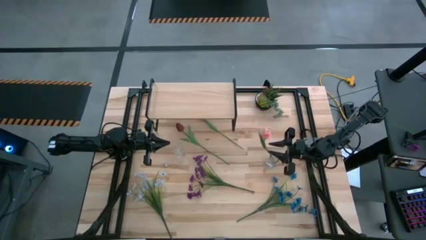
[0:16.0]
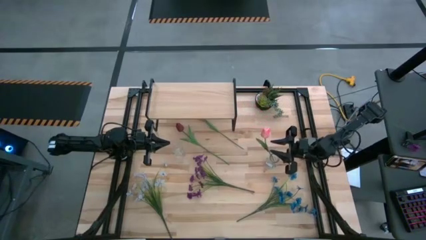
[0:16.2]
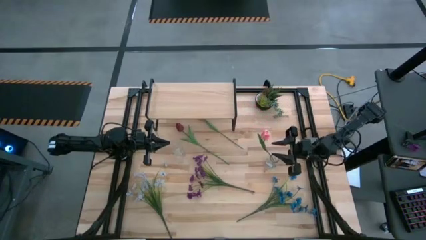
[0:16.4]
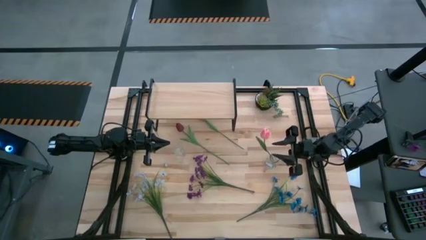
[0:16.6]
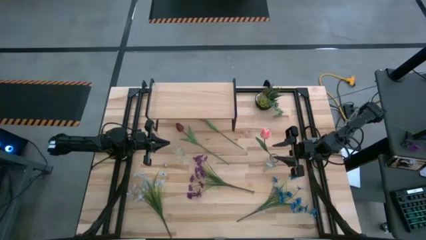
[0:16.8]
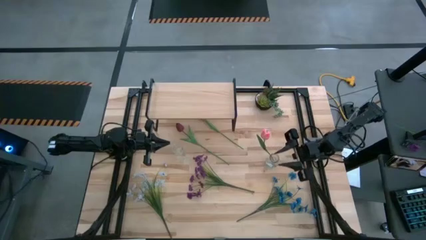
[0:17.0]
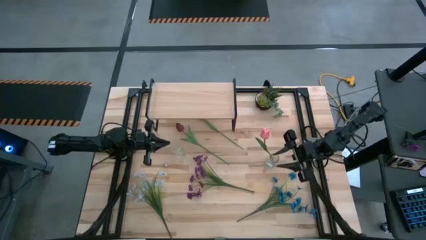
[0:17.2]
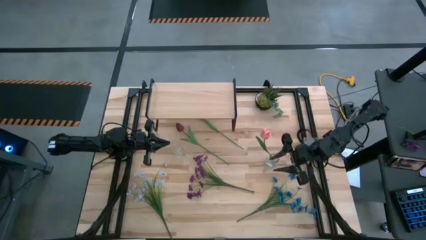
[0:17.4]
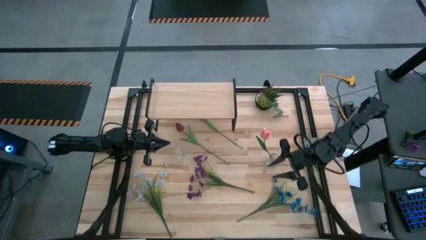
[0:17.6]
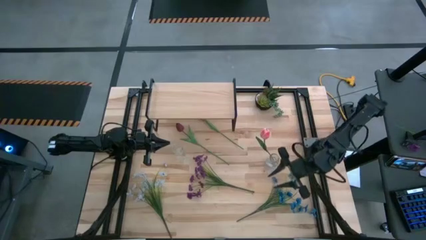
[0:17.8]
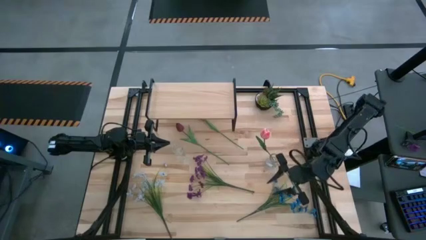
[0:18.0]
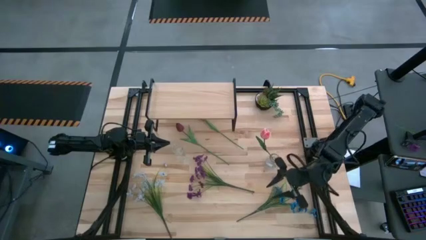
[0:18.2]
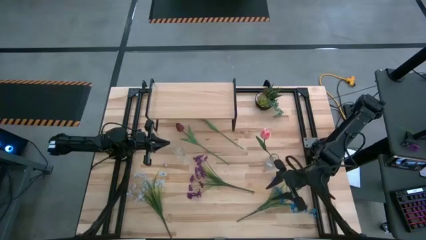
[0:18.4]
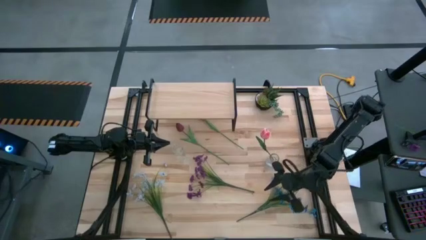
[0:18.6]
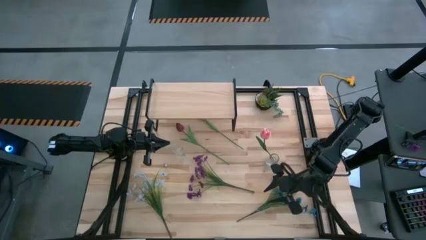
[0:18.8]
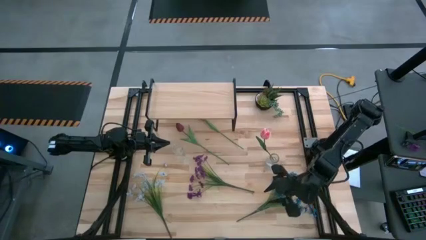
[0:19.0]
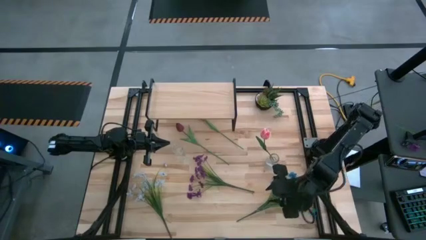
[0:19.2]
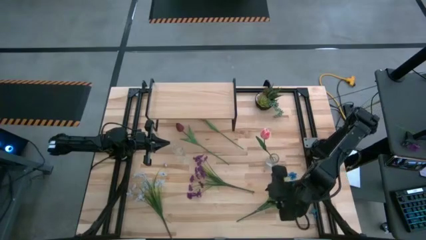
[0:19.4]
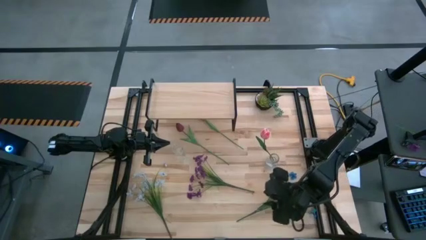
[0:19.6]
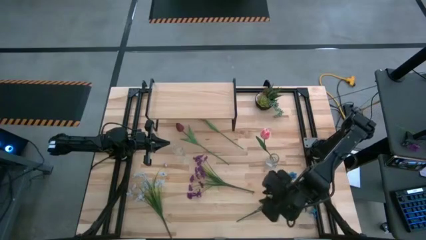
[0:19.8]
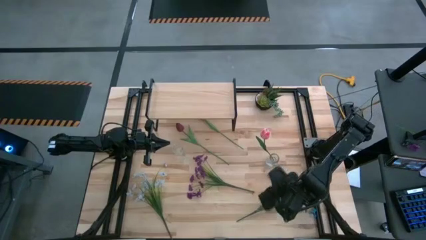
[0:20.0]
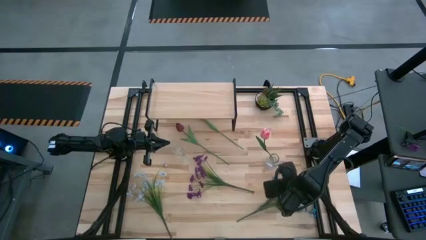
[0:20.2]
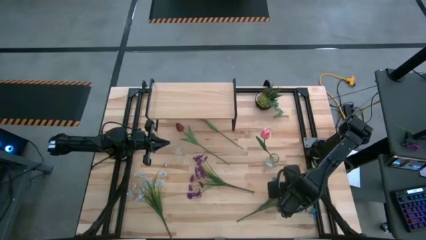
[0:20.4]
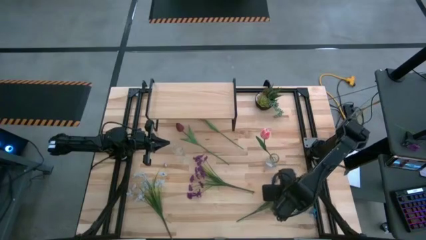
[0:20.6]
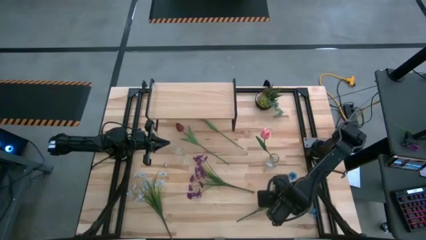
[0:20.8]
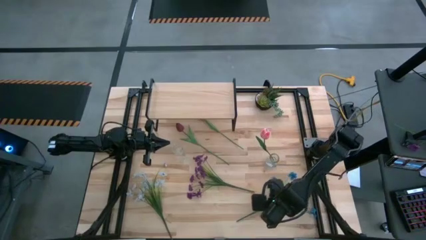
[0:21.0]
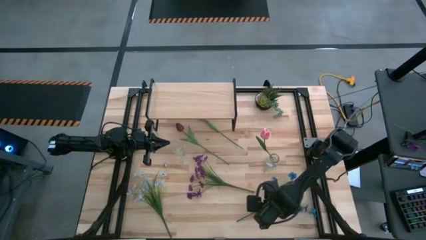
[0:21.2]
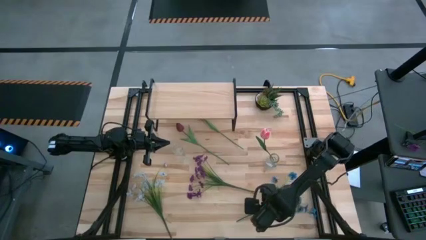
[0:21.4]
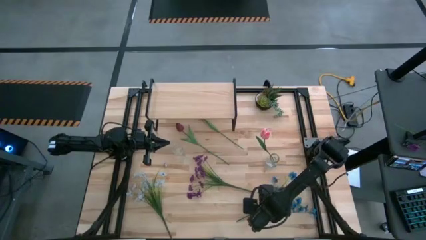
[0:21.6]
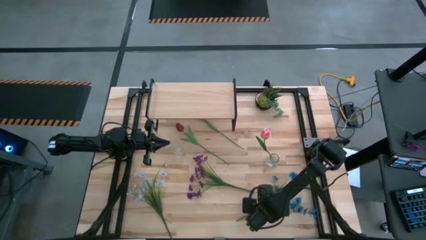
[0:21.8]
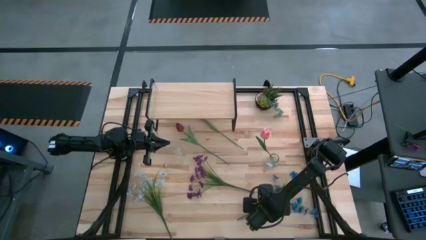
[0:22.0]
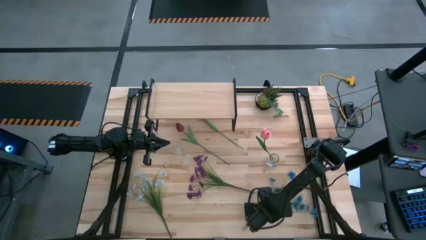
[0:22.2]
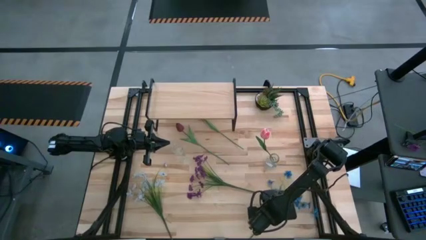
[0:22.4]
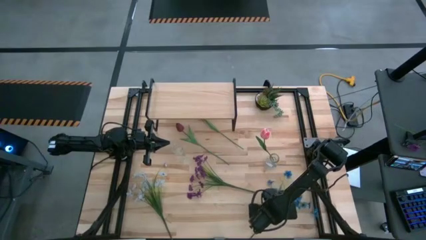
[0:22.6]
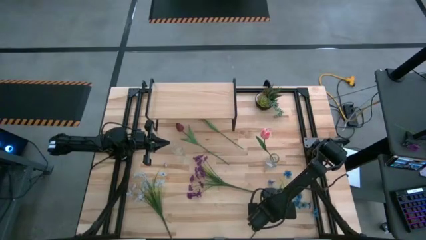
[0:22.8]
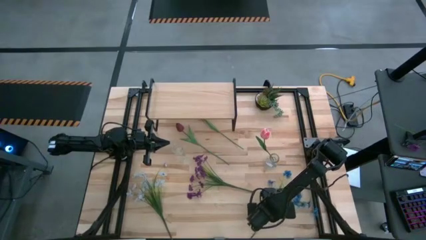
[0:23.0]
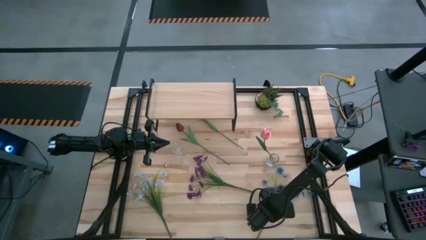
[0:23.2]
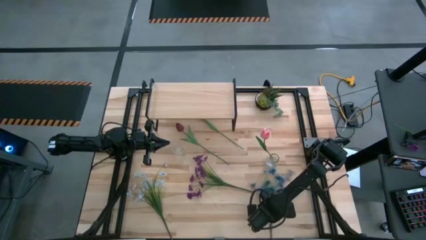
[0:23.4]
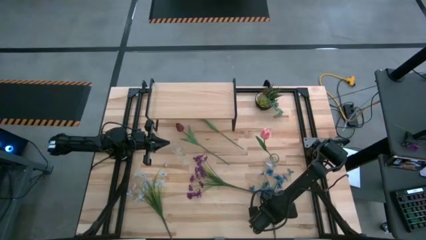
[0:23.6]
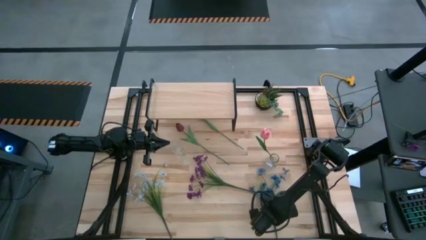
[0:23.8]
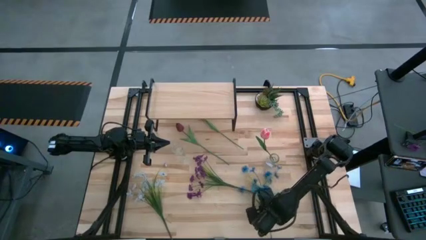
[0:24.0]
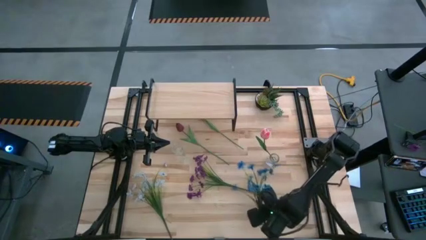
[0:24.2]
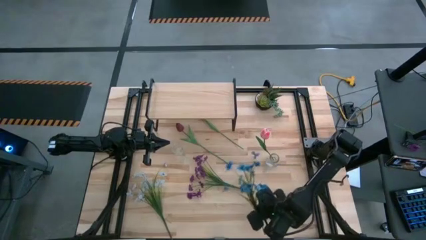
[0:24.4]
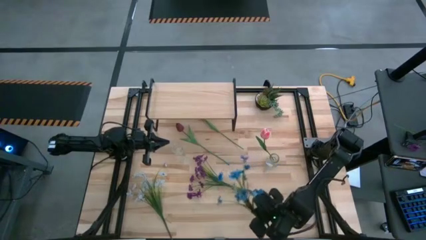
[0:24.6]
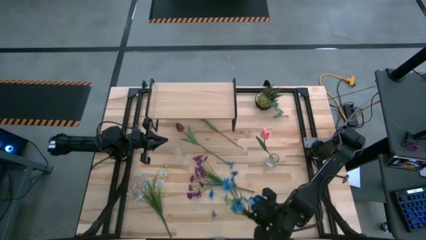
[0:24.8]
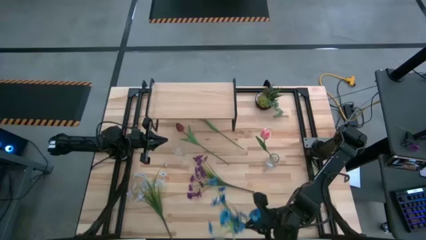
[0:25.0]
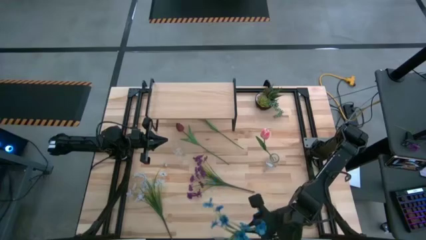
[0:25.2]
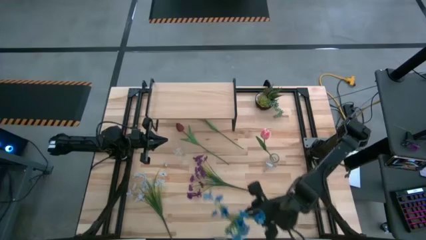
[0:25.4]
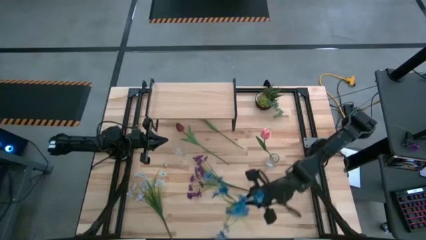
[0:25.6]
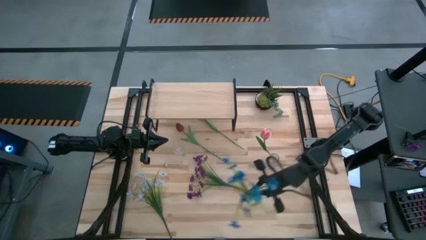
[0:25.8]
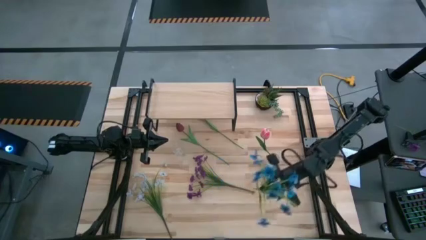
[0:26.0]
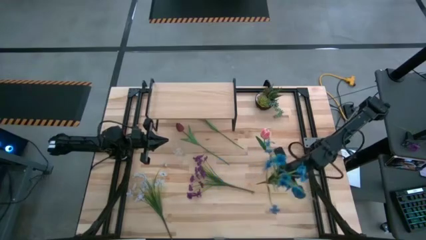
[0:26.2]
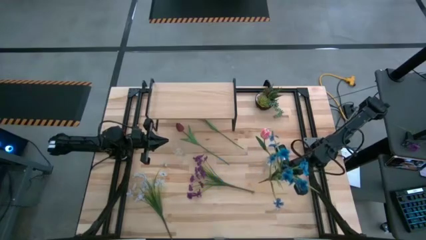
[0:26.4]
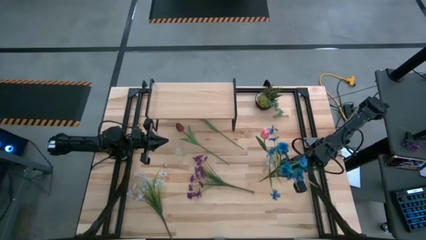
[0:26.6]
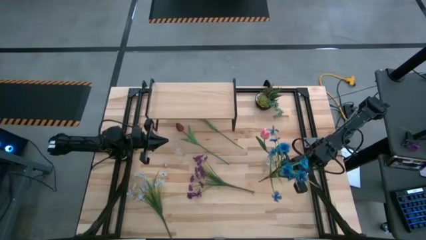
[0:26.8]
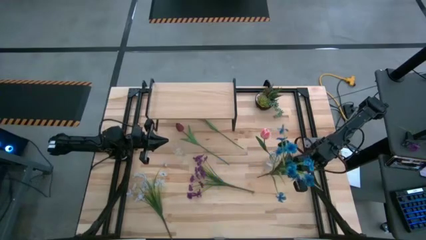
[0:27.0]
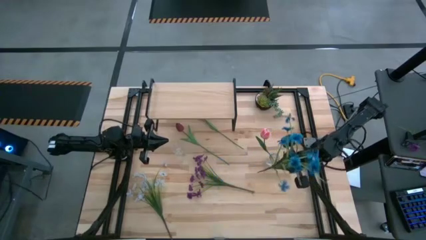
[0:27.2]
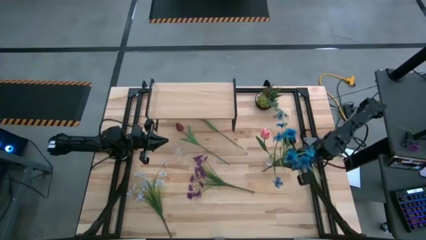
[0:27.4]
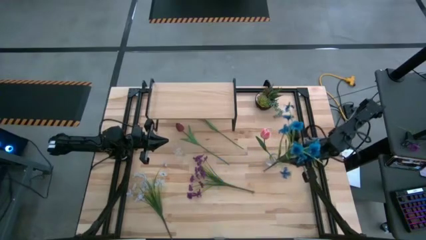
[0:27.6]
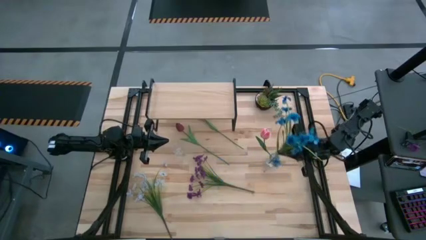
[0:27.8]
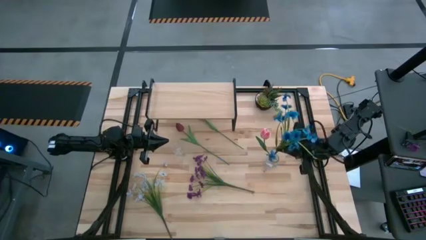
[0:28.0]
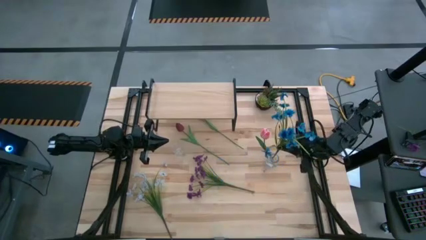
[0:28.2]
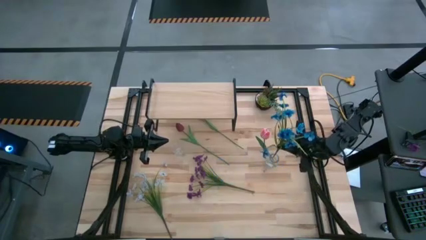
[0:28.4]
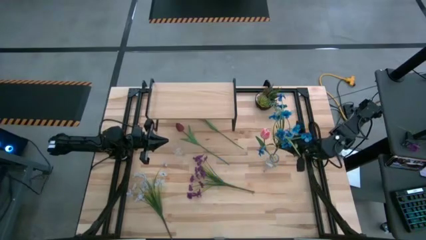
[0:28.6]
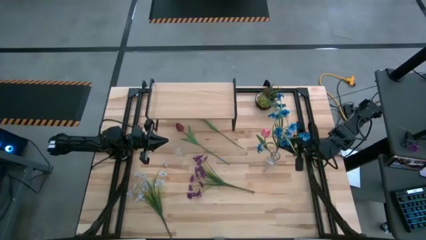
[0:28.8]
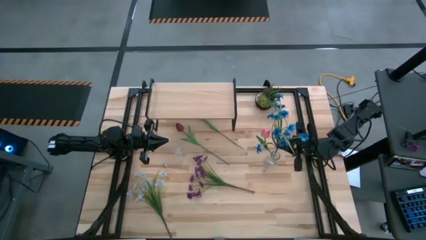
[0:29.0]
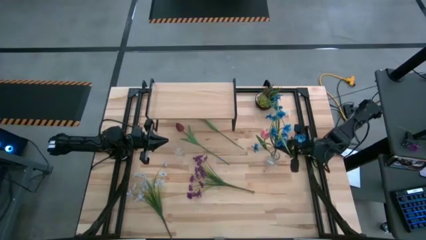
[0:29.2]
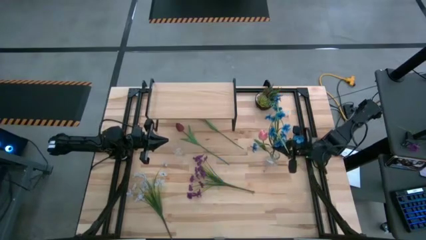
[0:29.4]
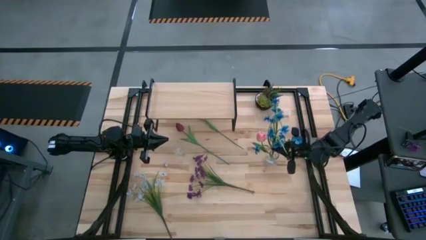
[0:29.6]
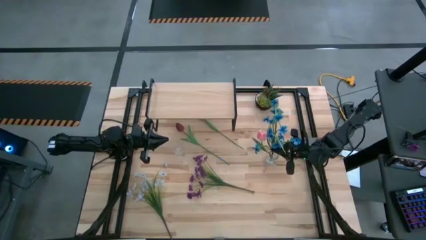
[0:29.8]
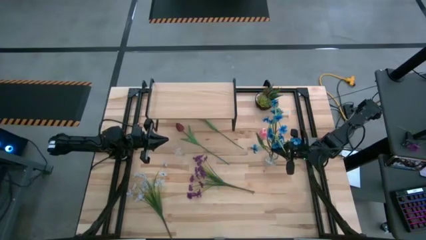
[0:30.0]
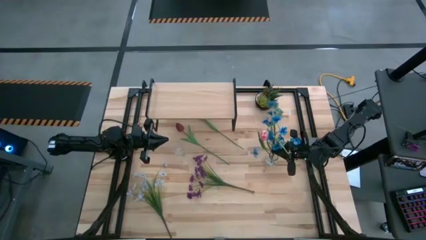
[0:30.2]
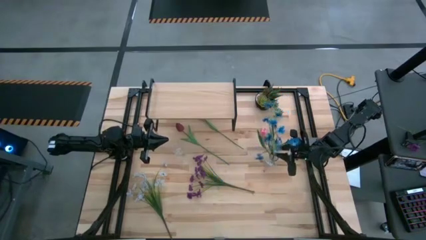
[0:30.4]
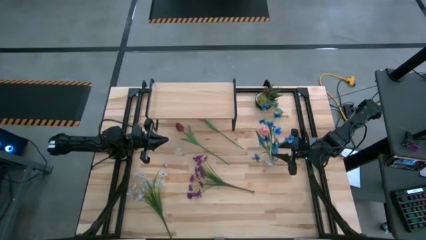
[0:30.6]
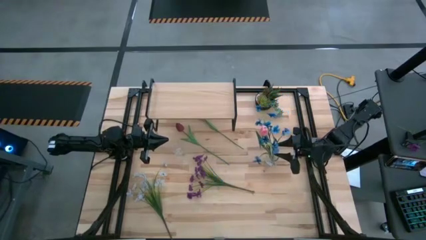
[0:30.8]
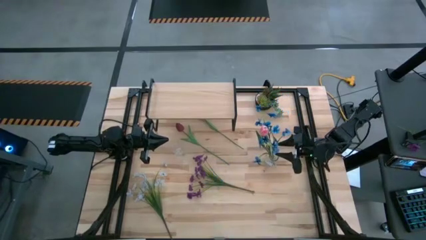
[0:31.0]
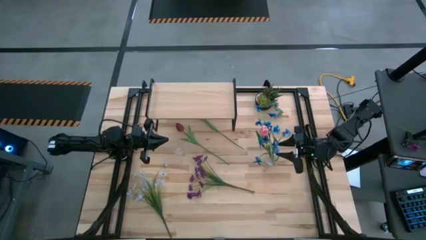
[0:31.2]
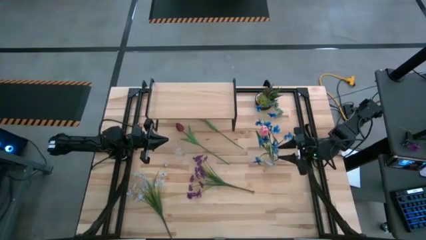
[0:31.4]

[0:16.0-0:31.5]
Task: Pick and place flowers into a vace then onto a shelf
Put the blue flowers into the right transparent vase

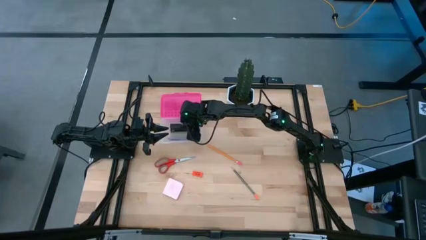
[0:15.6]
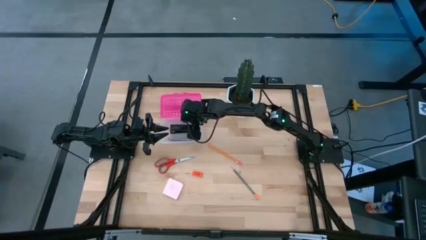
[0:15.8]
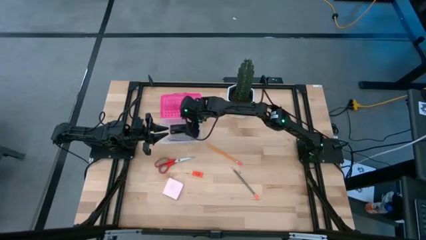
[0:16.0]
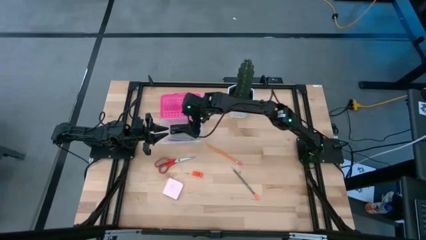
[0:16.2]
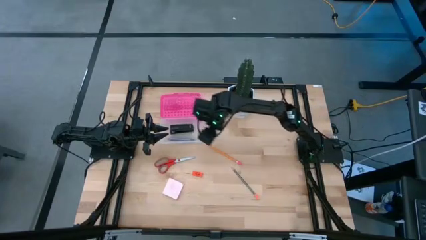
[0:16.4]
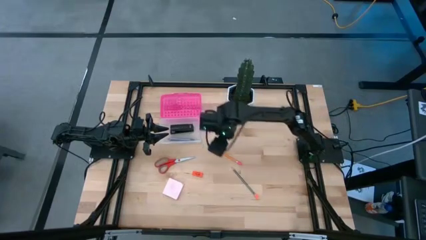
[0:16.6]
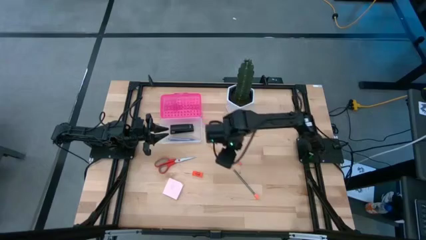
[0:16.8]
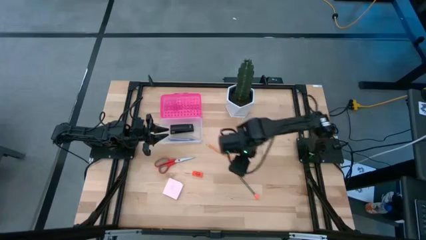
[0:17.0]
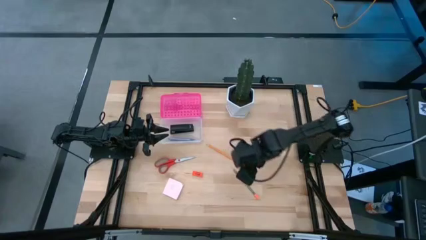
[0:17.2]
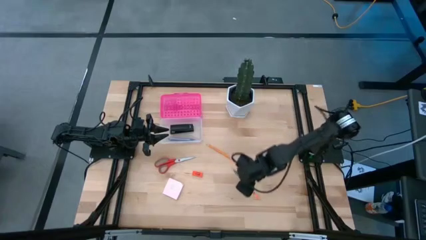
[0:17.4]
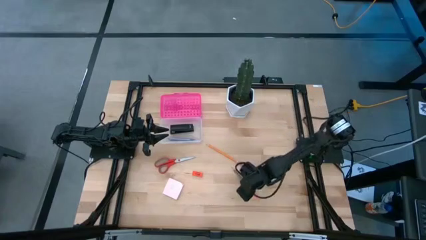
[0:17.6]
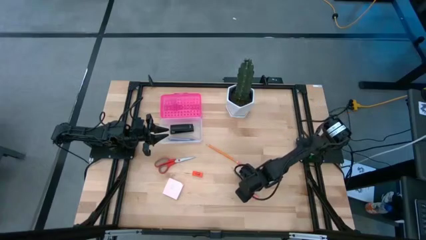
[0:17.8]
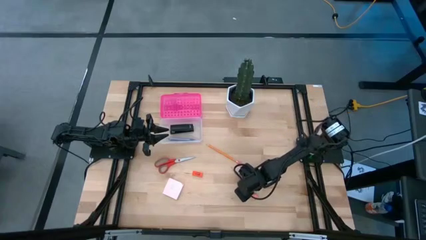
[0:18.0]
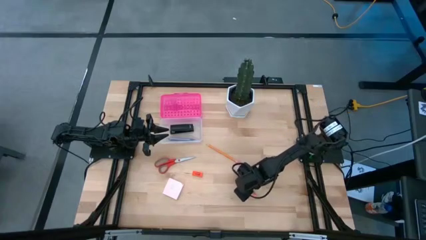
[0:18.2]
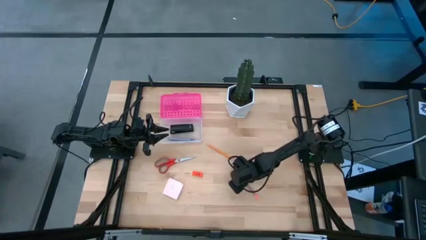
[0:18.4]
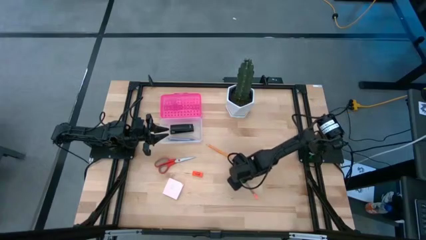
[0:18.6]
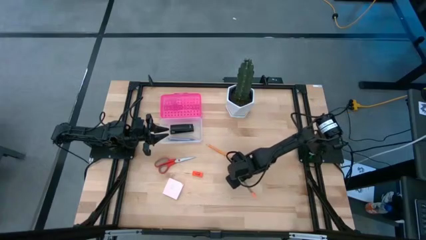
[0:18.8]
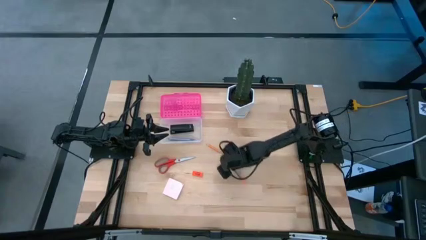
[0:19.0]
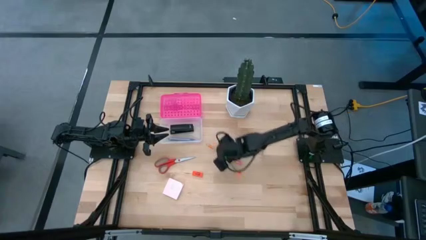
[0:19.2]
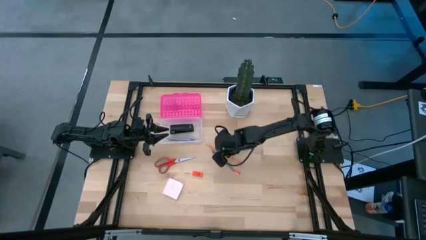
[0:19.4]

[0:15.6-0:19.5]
Task: Pack school essentials
Put the black pencil into the supply box
